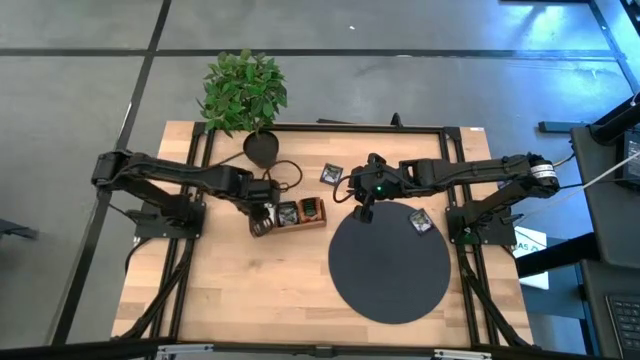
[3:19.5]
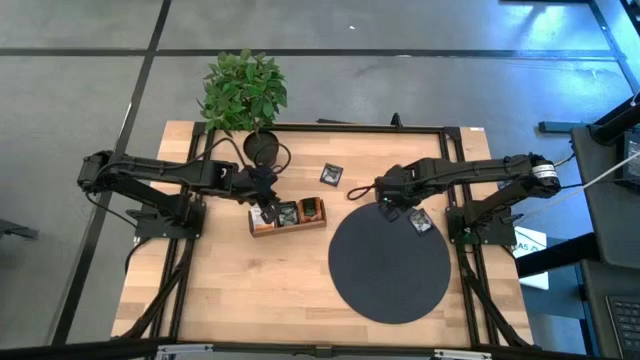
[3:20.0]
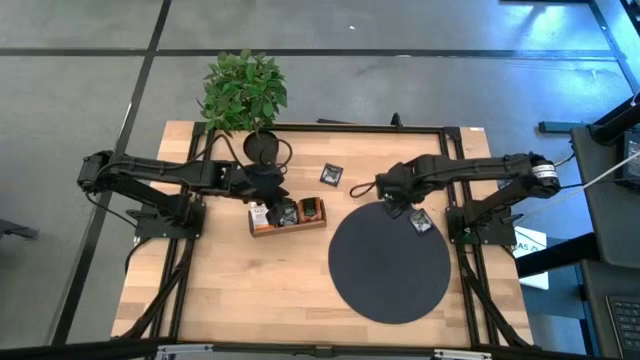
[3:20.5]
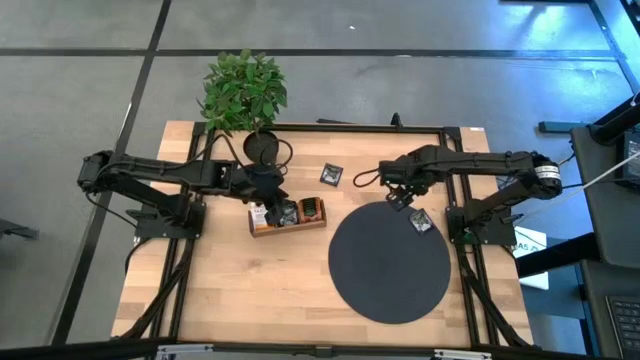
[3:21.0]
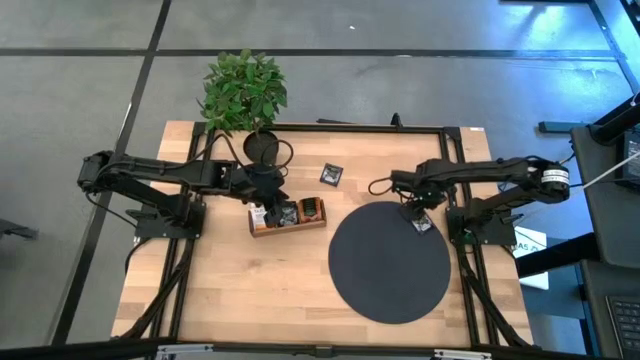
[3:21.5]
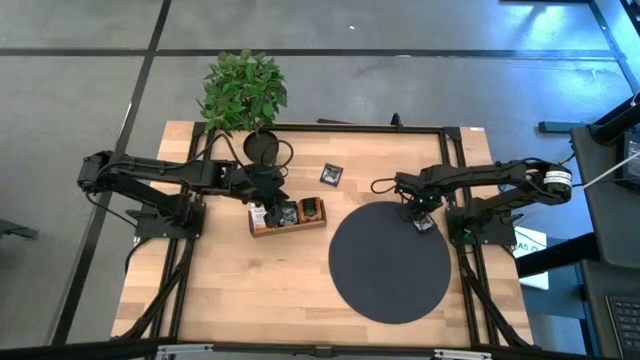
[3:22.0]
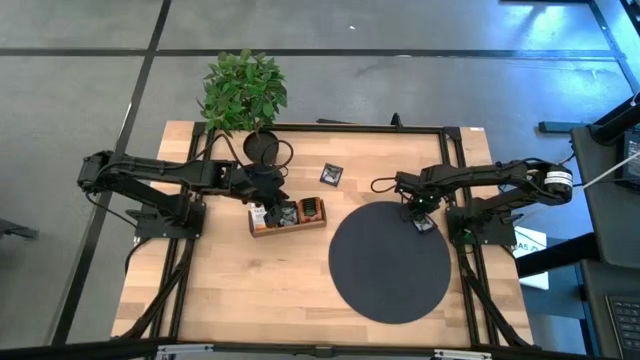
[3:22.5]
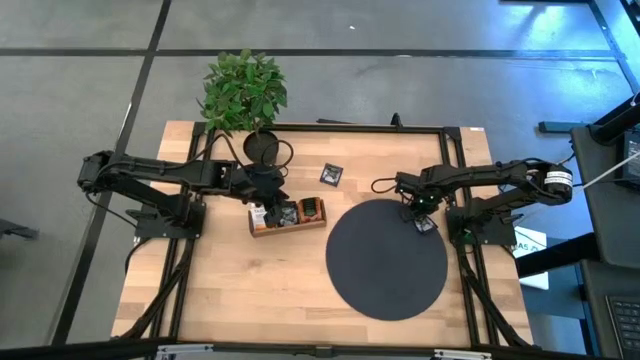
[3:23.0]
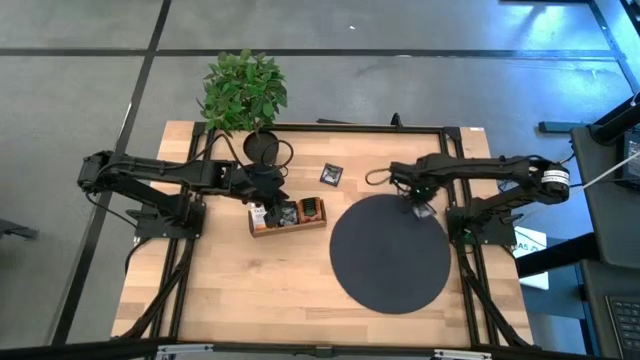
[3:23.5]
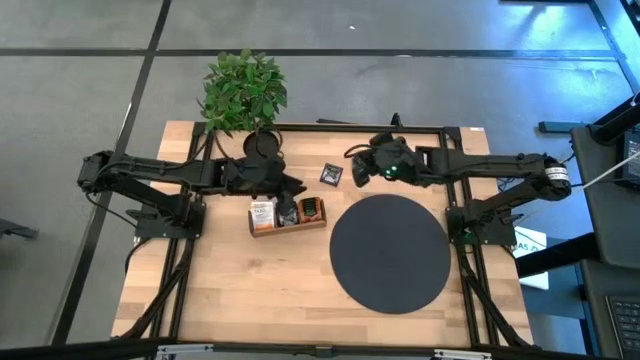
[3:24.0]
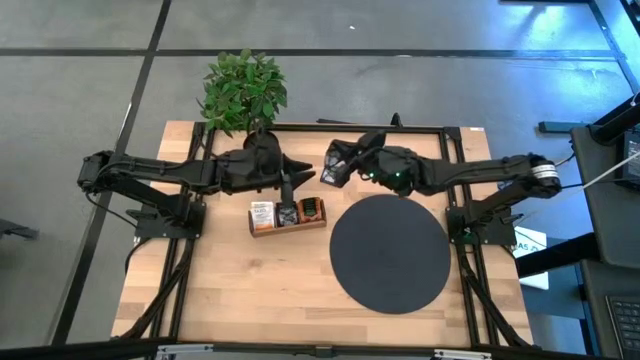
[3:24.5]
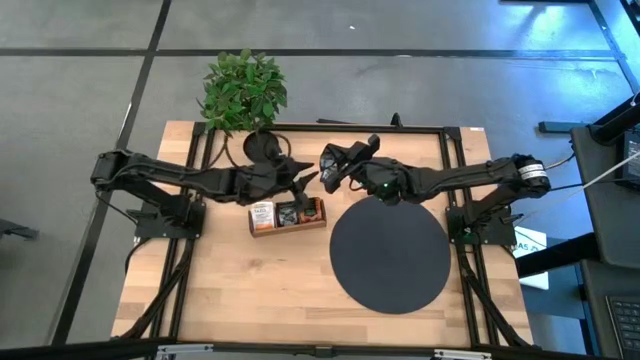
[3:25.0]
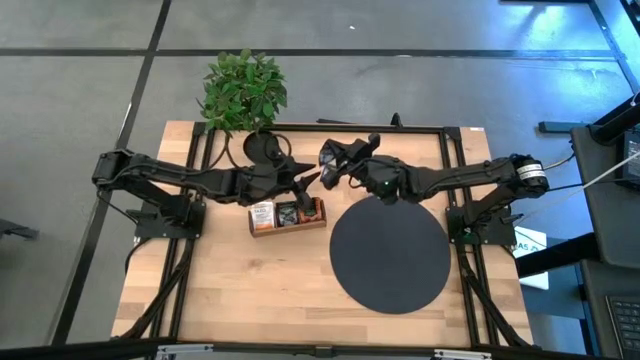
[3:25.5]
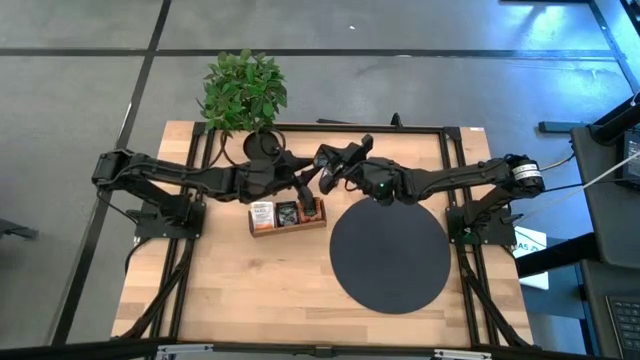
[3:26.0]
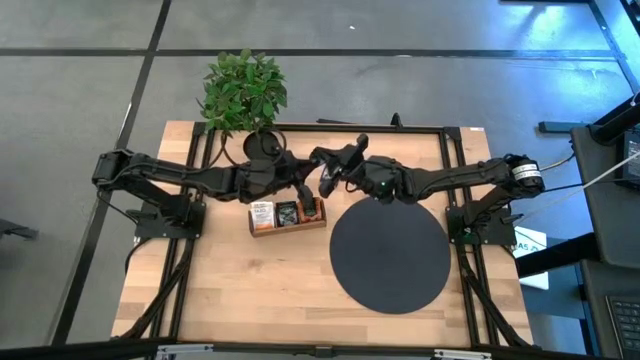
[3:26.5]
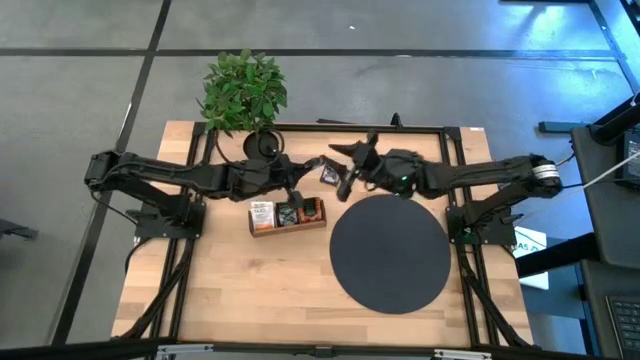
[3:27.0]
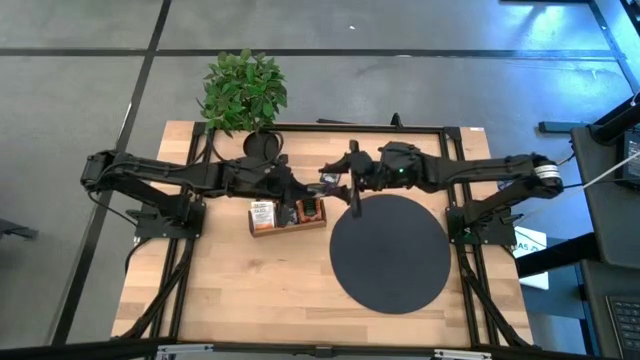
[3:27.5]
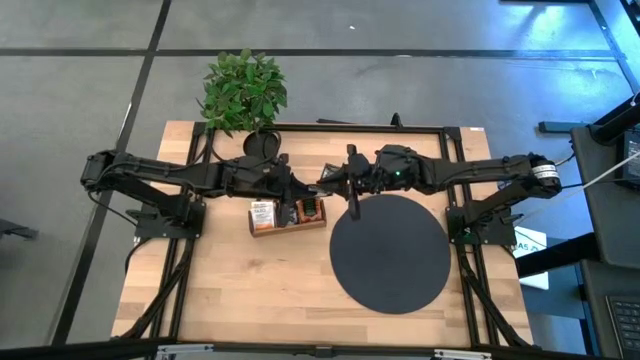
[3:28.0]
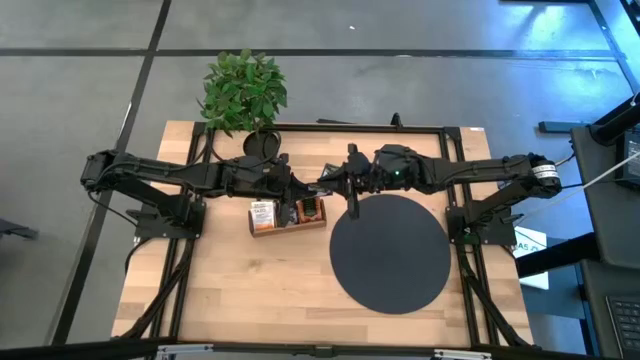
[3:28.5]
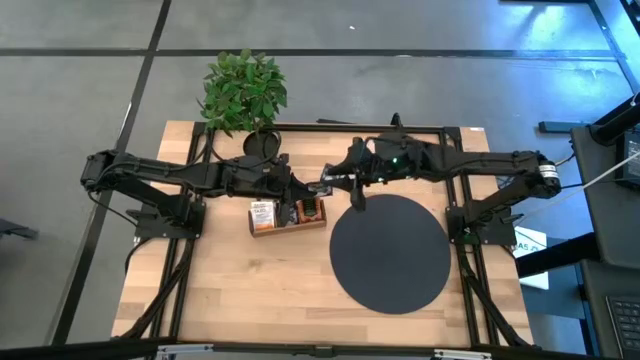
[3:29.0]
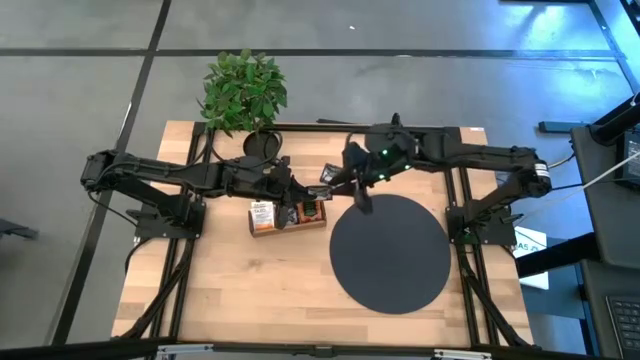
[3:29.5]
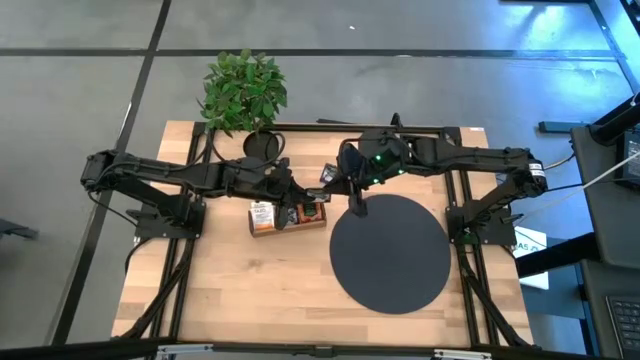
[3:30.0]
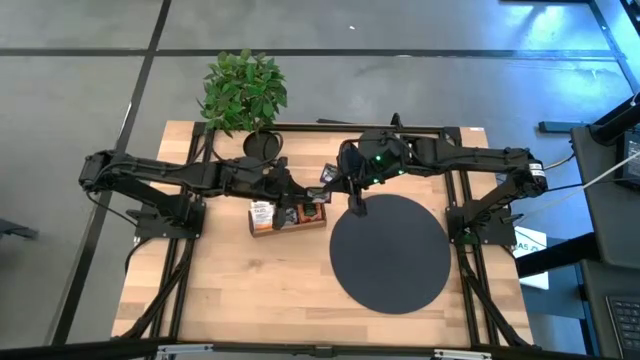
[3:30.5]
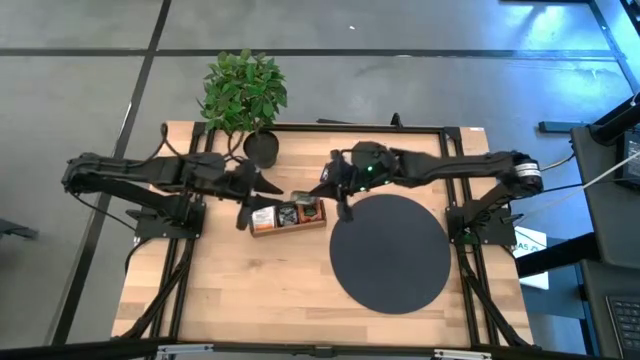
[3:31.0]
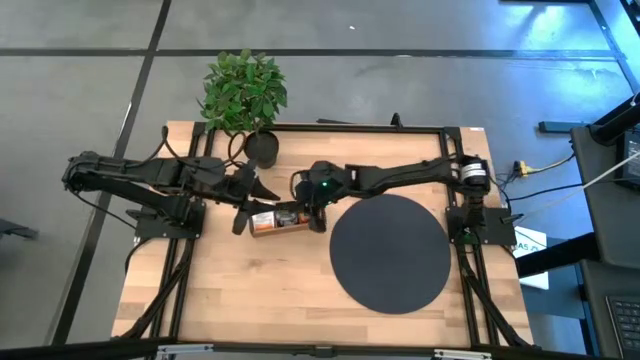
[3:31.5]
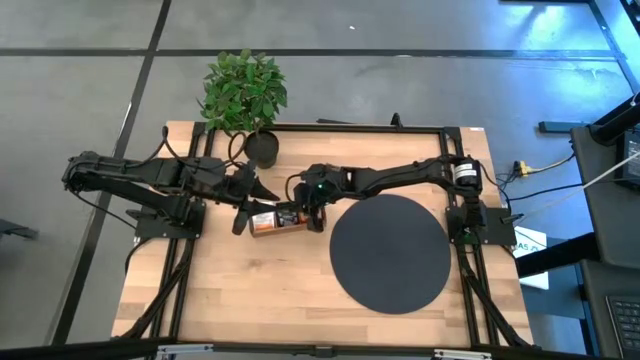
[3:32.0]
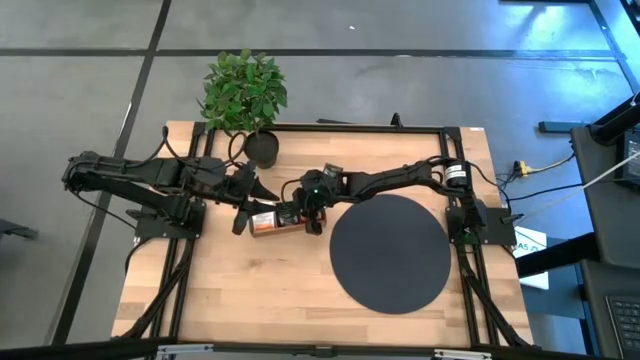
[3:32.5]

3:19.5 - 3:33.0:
Task: Pick & Place Tea
Put the bottom purple tea bag into the middle section of the wooden organizer

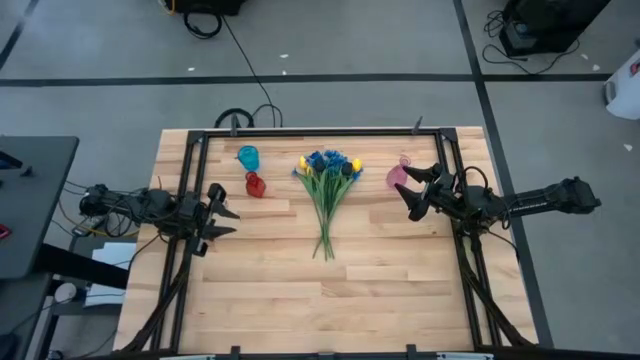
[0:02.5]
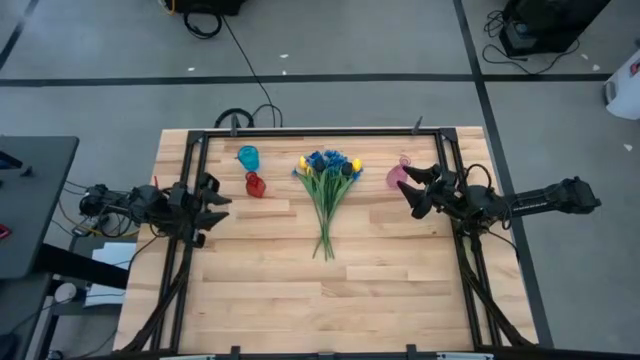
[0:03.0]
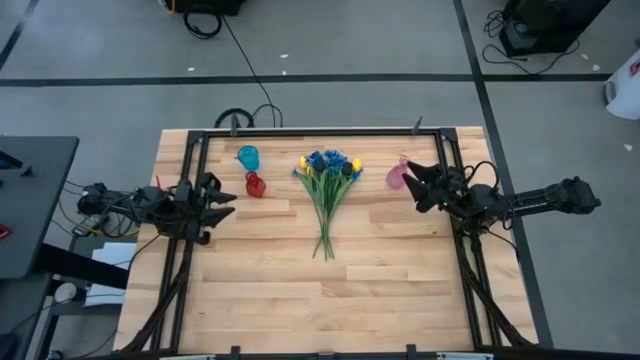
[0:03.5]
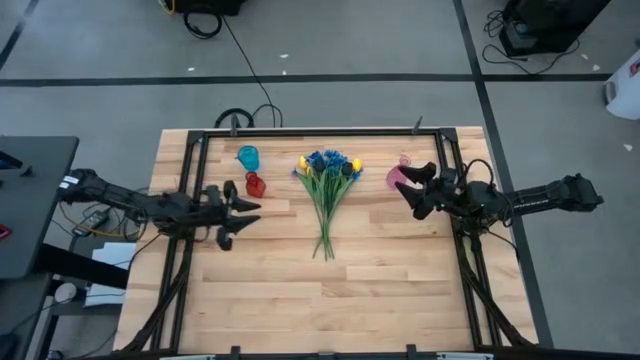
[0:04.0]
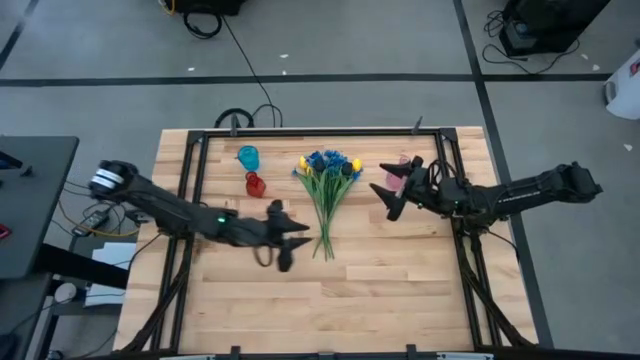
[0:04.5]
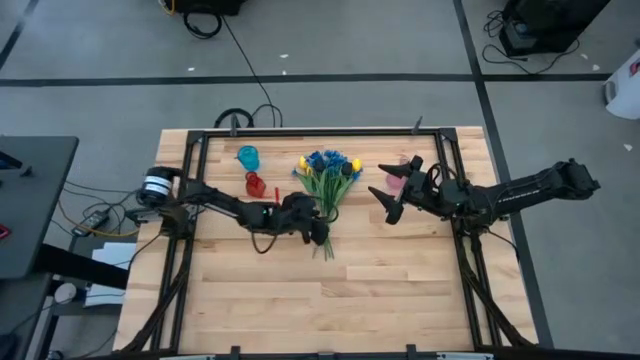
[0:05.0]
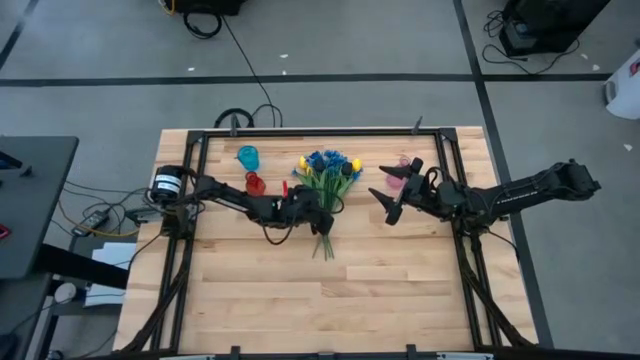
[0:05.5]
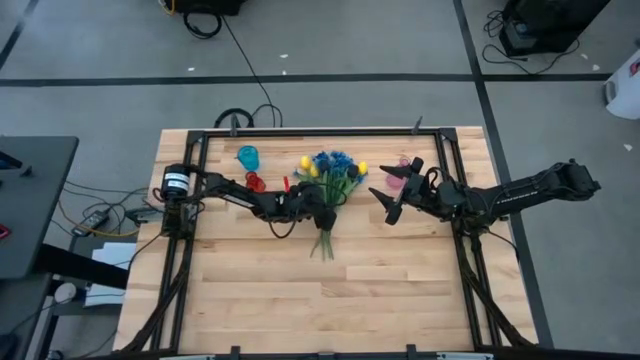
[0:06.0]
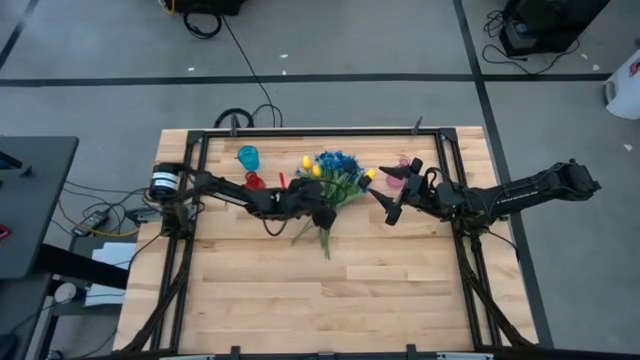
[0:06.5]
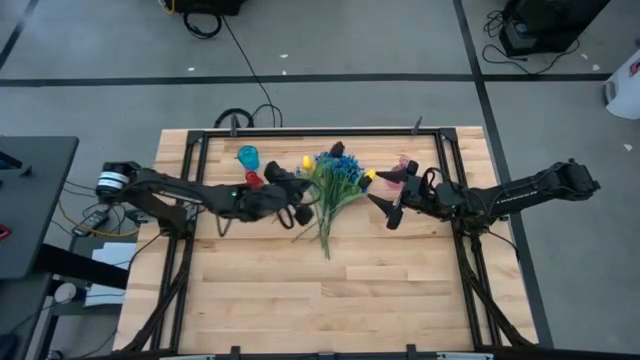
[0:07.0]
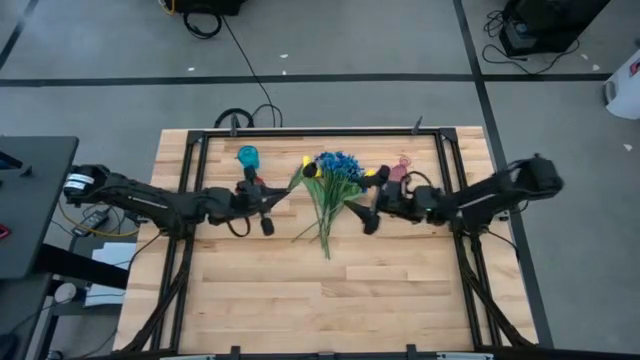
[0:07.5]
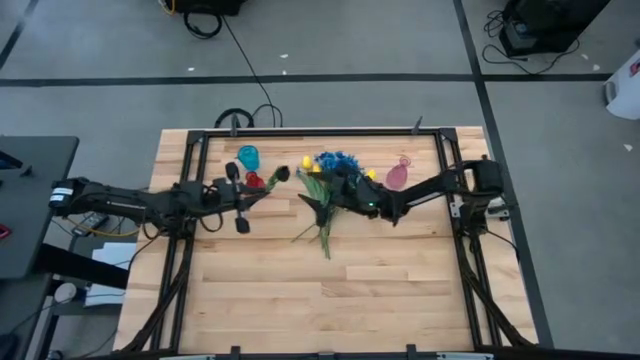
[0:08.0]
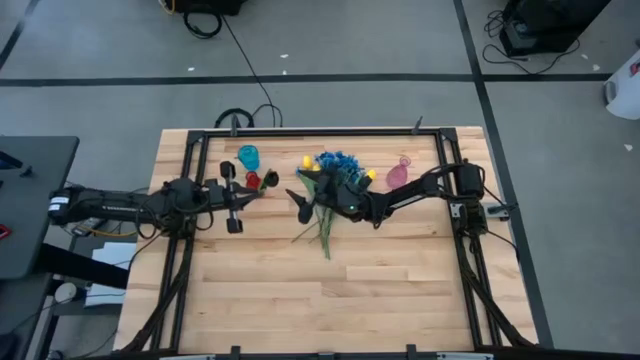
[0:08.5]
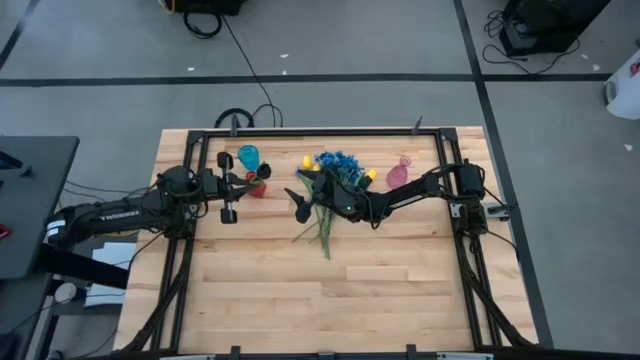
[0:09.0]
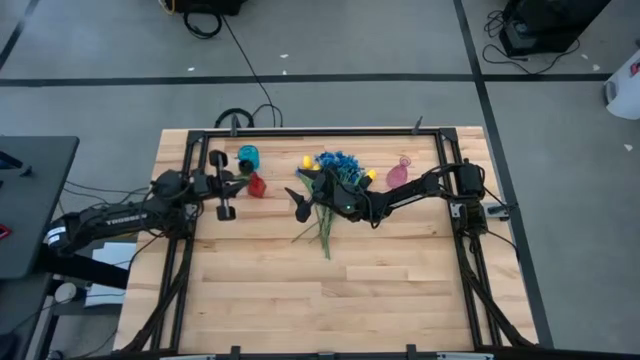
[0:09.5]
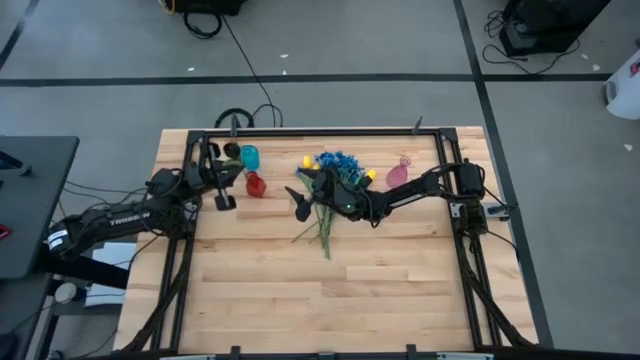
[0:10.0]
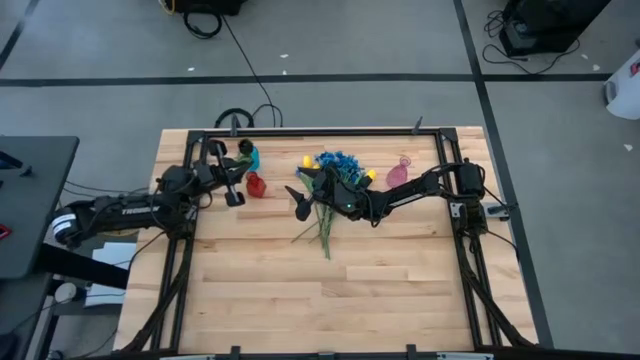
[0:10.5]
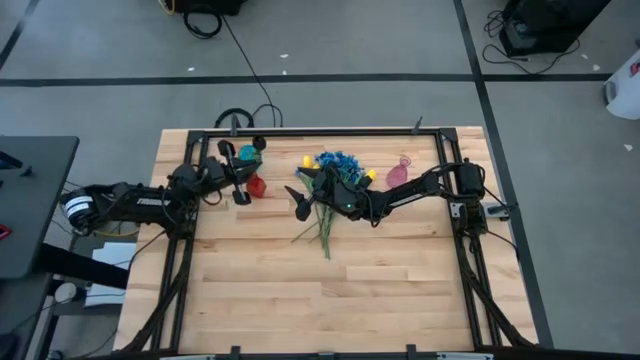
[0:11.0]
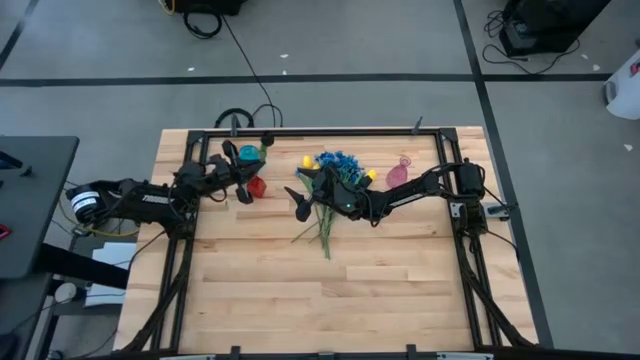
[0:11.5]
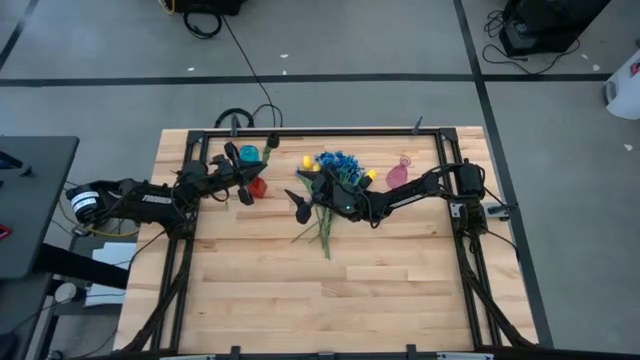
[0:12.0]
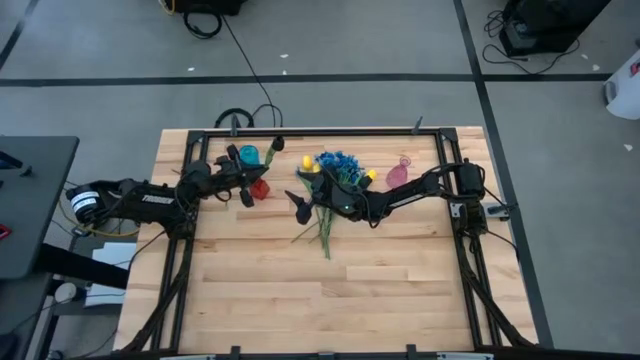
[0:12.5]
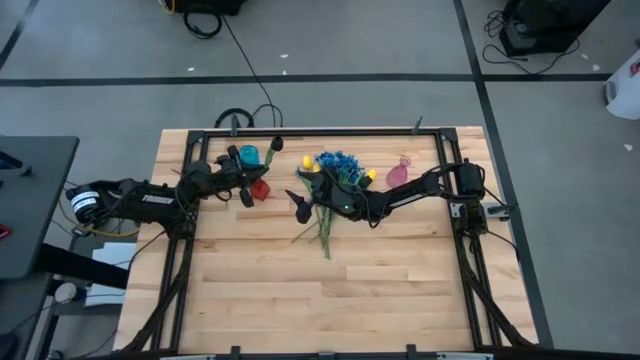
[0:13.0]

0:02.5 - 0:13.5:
Task: Sort flowers into vase by color
Put the black flower into the red vase
